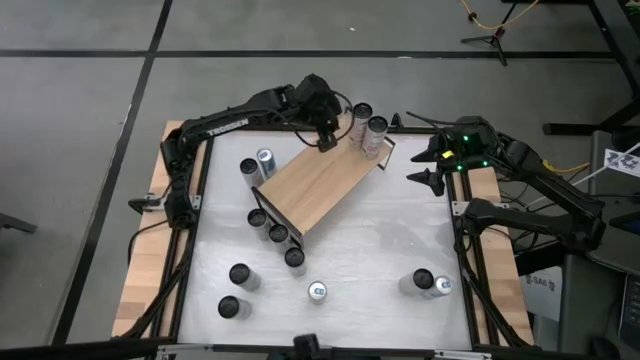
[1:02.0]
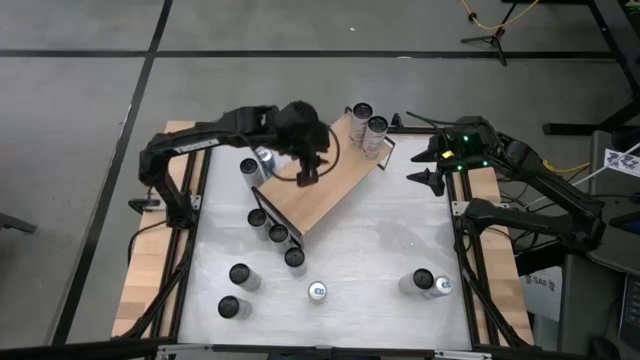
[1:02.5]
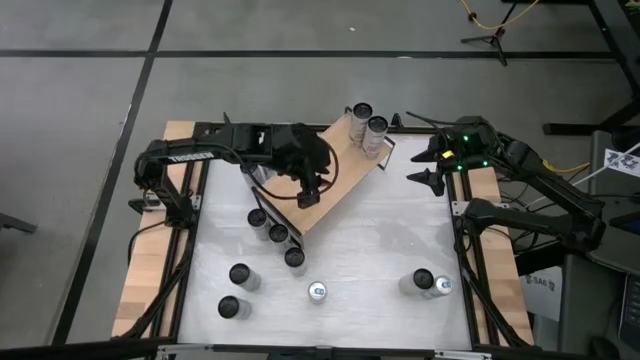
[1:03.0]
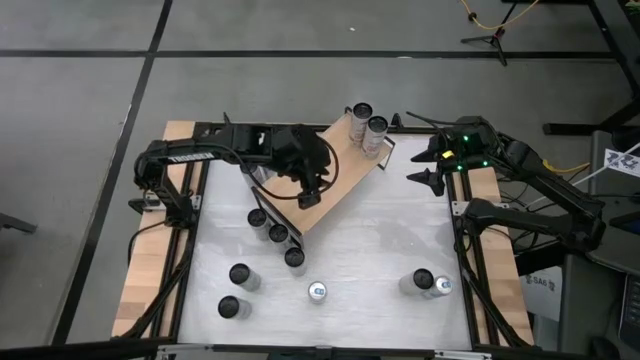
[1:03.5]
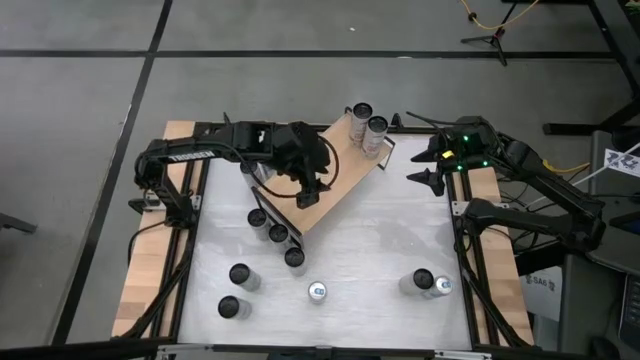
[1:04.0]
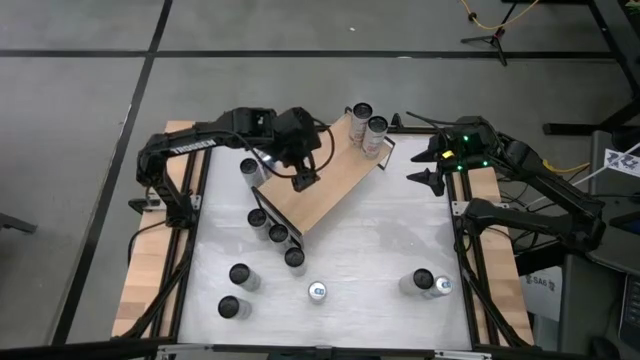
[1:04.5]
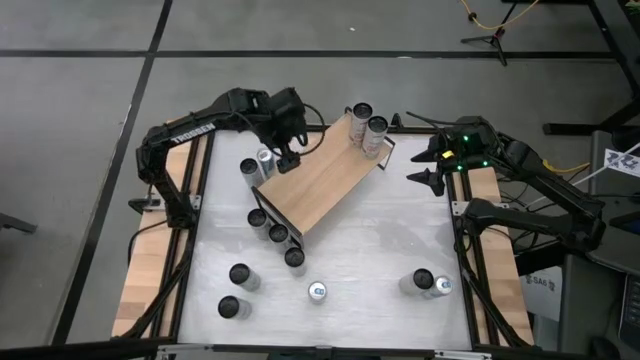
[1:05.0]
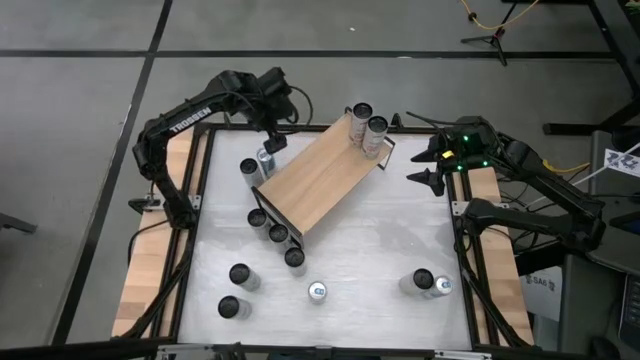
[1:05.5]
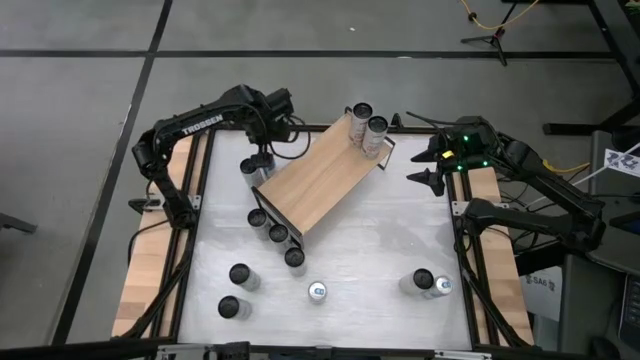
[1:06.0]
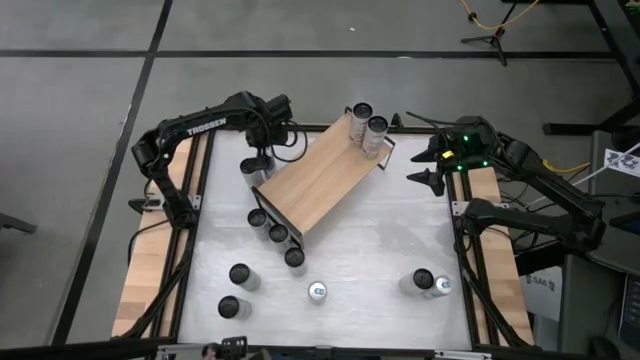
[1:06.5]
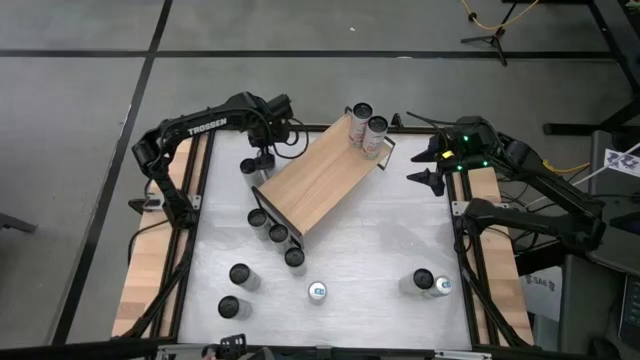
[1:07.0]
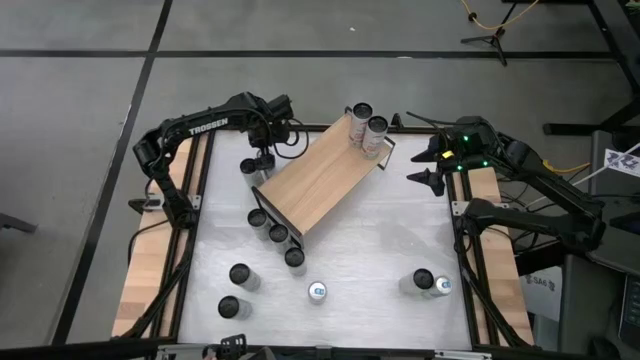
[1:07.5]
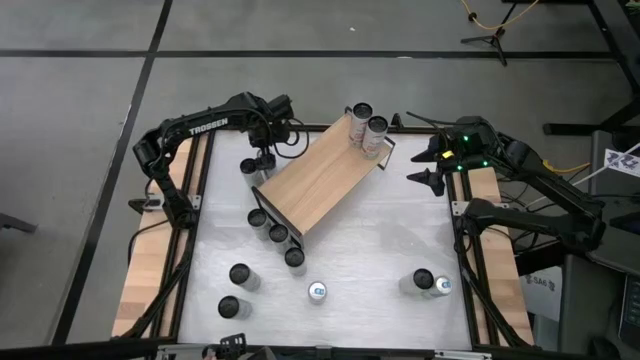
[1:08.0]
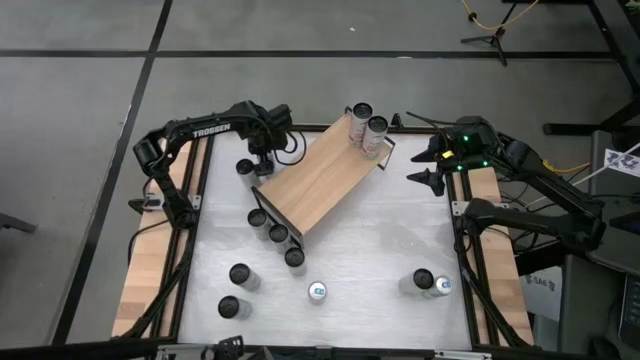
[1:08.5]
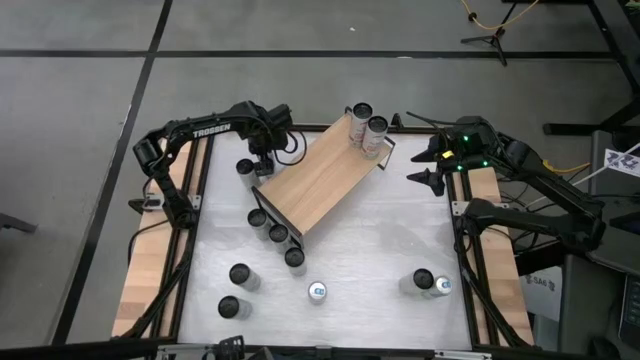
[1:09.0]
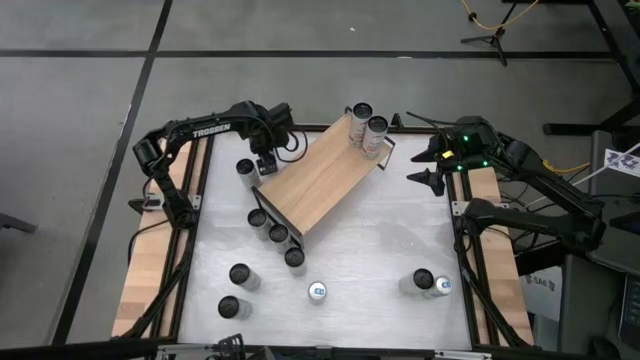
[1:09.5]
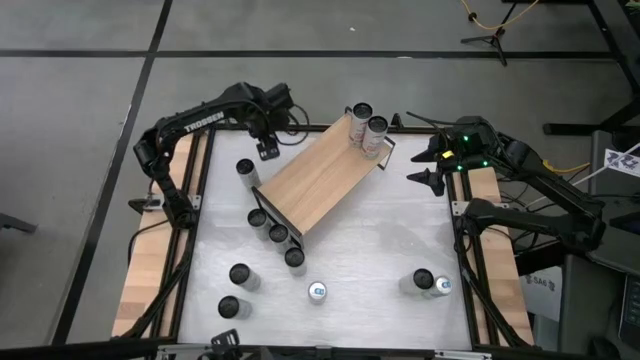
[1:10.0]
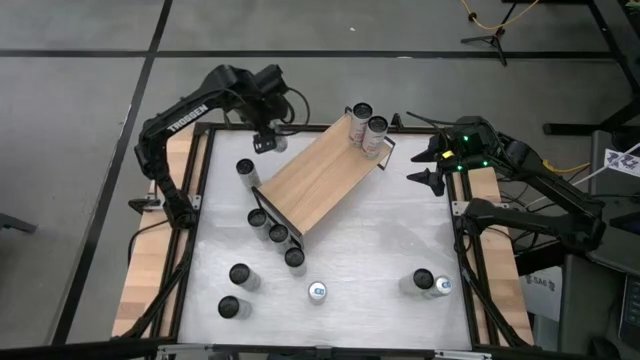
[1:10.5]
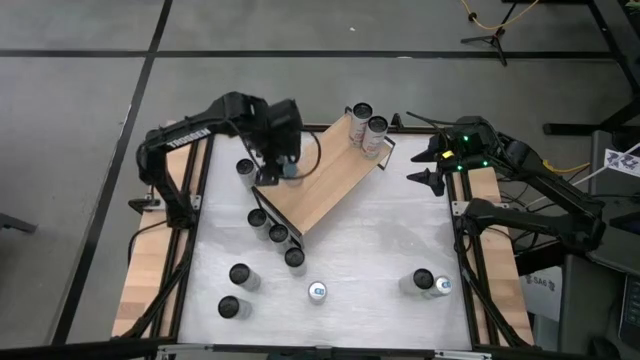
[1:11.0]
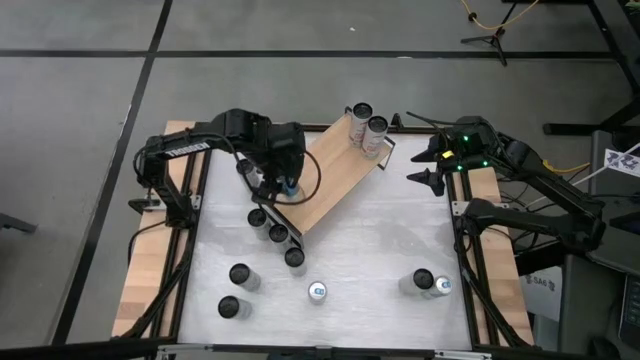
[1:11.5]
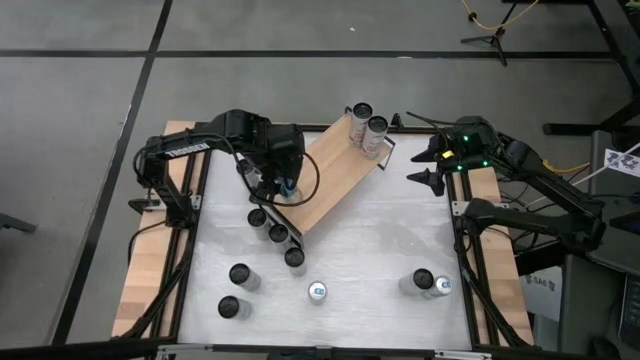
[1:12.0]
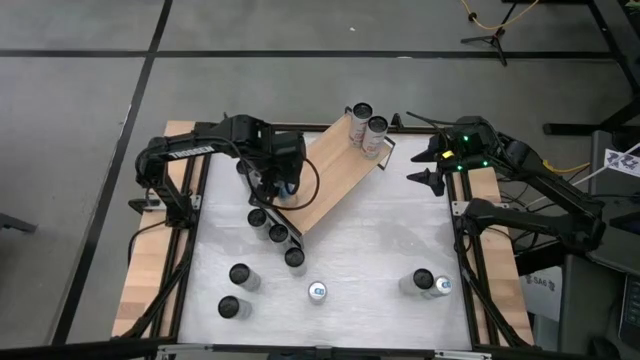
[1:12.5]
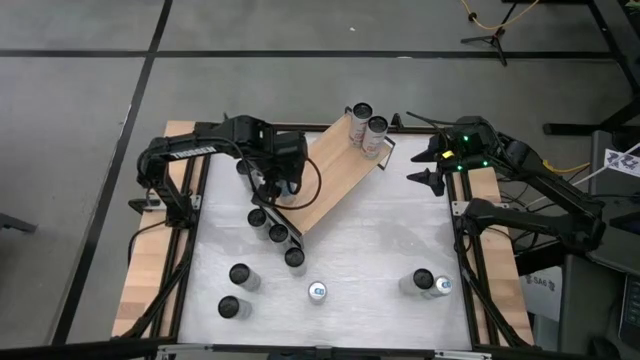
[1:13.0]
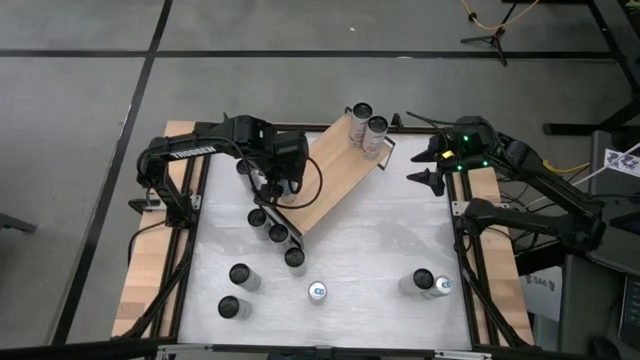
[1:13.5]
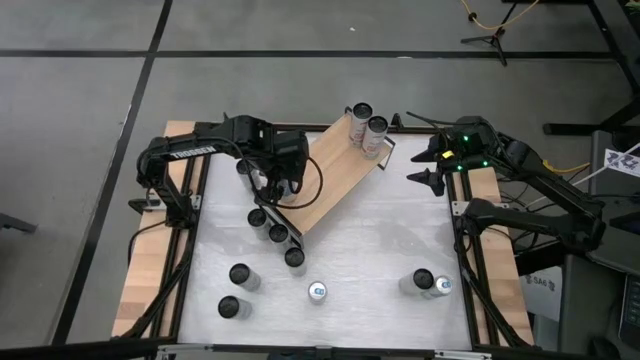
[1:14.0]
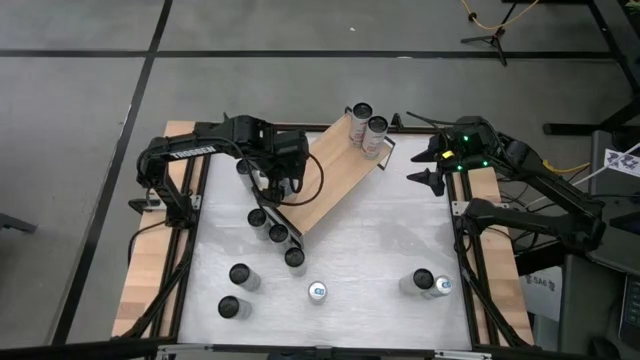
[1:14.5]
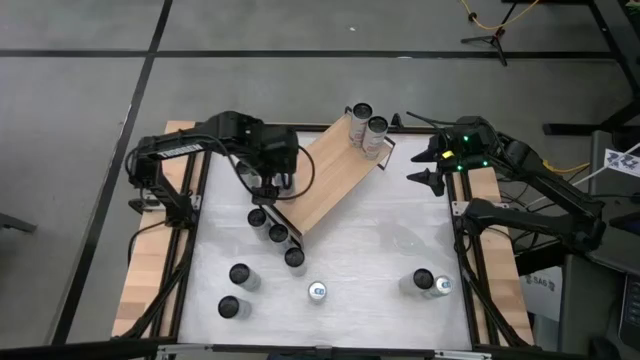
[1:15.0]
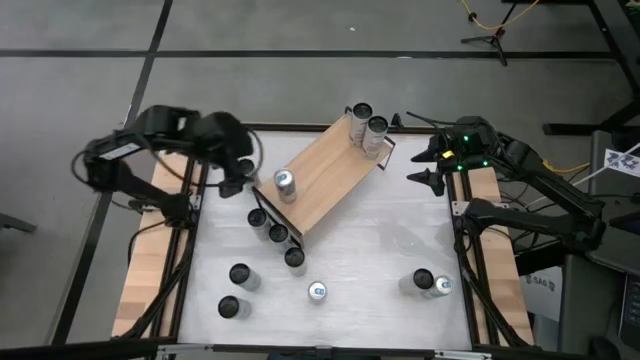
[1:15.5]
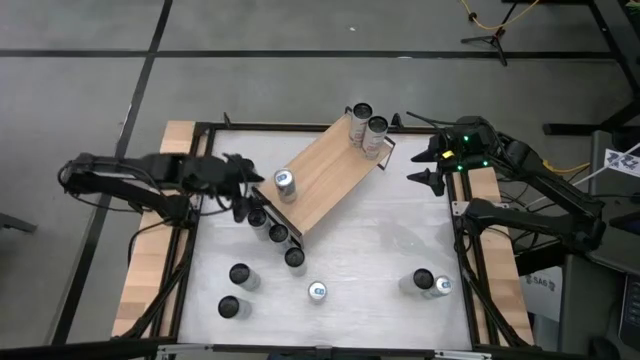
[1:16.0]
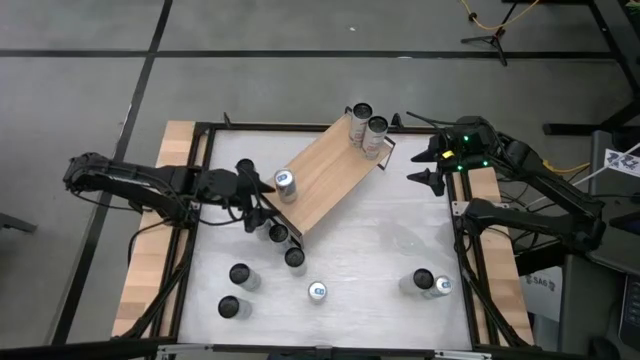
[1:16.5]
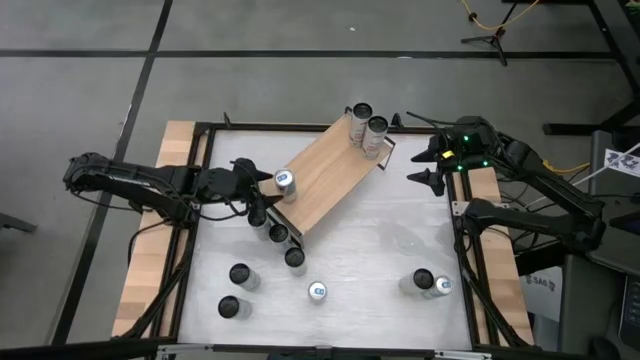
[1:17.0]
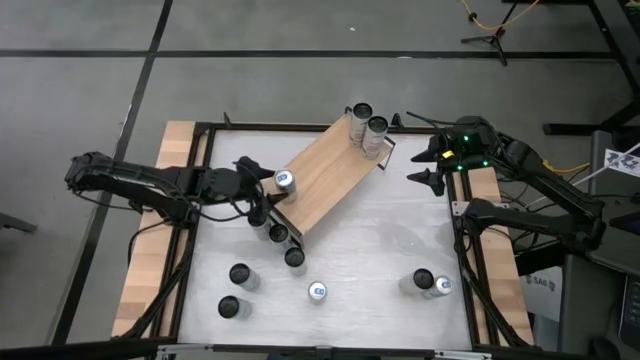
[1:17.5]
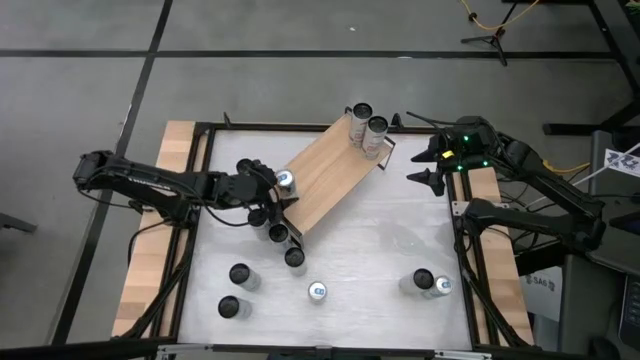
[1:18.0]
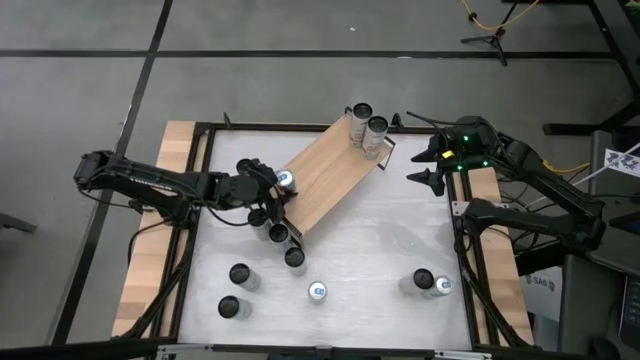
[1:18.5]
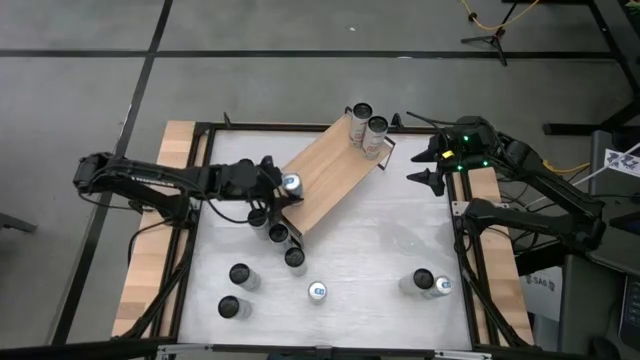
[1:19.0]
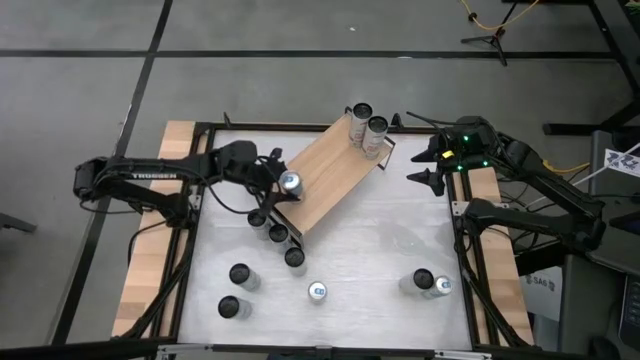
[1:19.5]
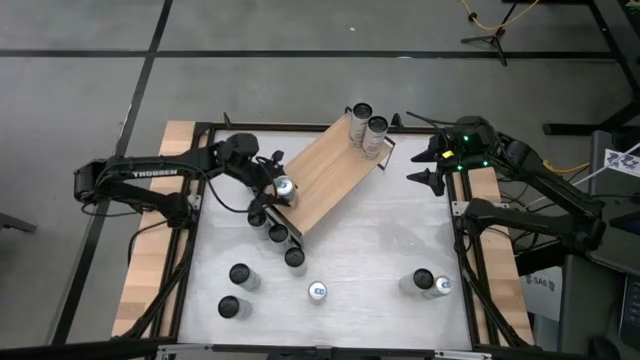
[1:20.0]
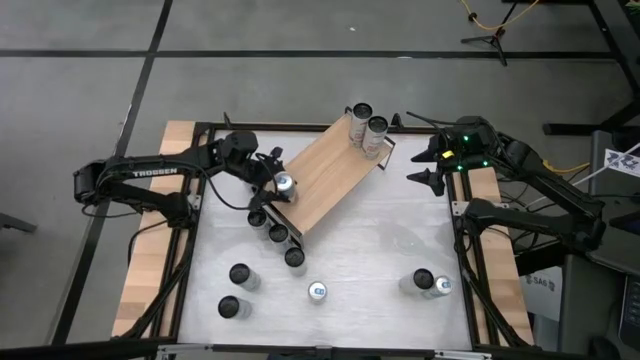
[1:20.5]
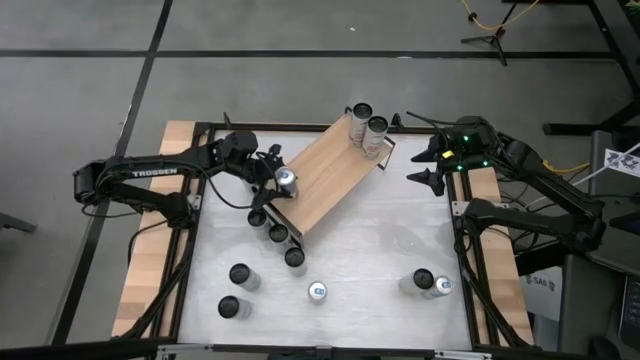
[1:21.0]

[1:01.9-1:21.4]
Task: Place canned beverage on shelf
Put the blue soda can on the shelf

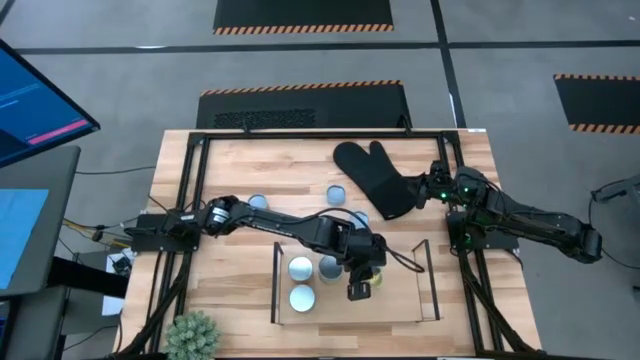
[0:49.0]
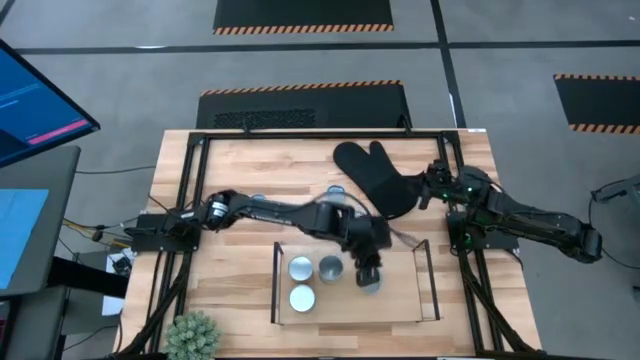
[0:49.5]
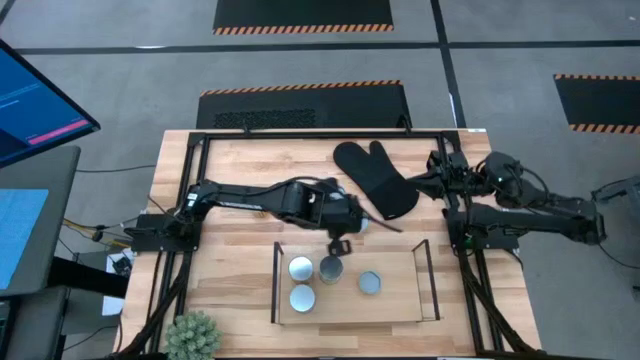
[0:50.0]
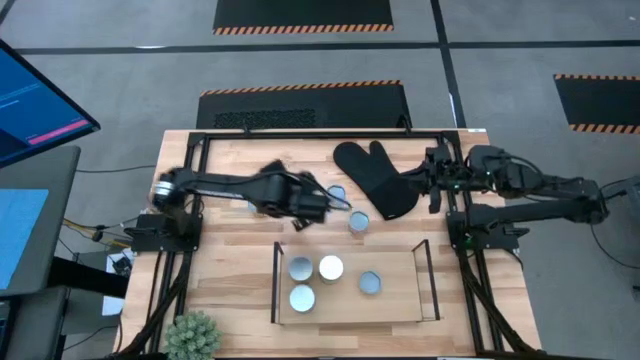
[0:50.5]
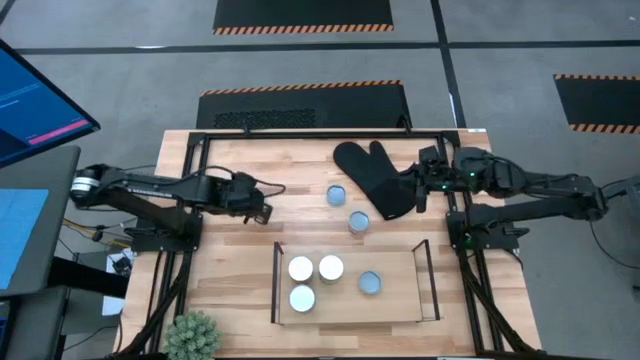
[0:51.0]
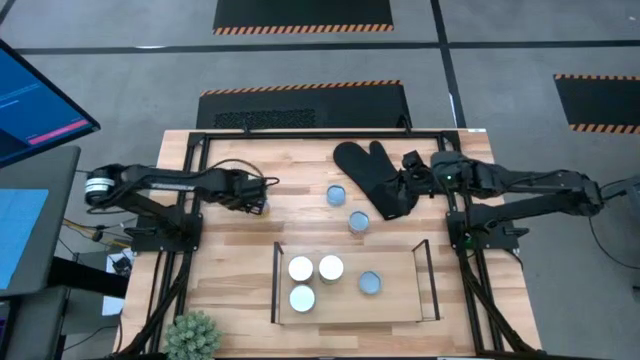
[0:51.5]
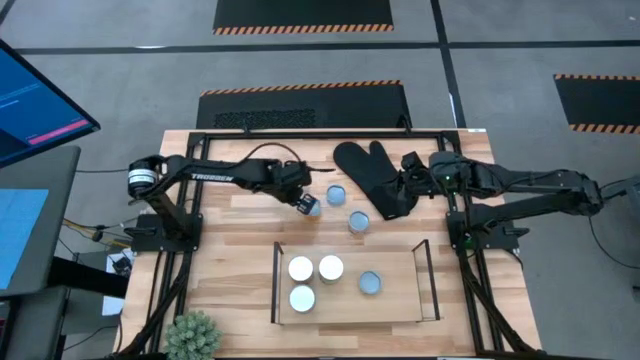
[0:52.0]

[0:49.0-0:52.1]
Task: Pick and place cans onto a shelf
Move the canned black beans to the center of the table
